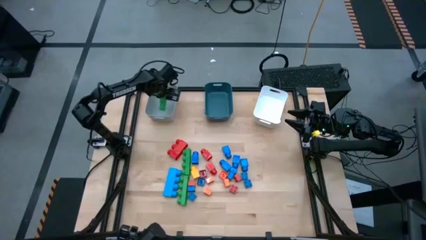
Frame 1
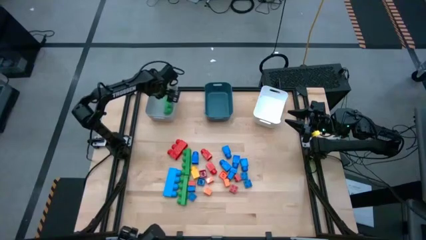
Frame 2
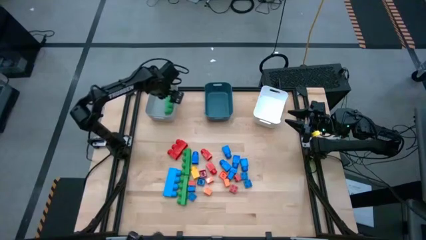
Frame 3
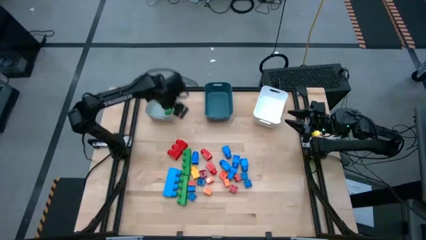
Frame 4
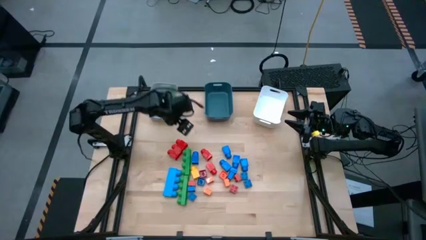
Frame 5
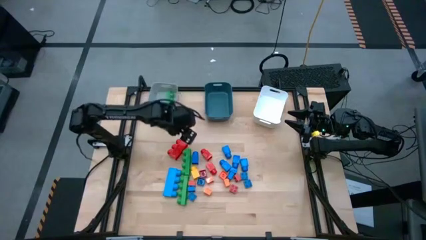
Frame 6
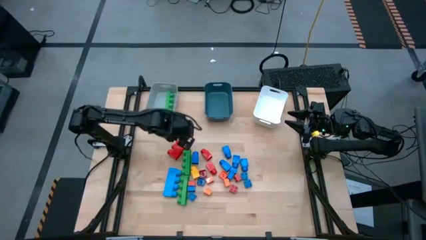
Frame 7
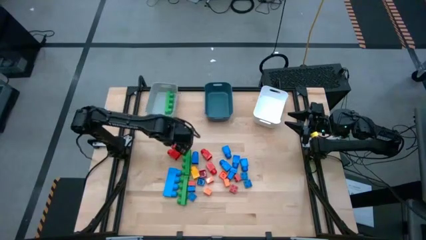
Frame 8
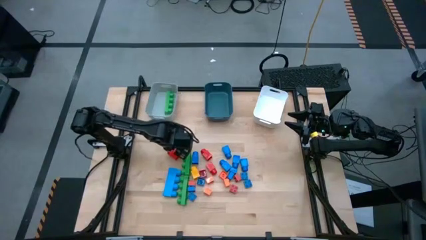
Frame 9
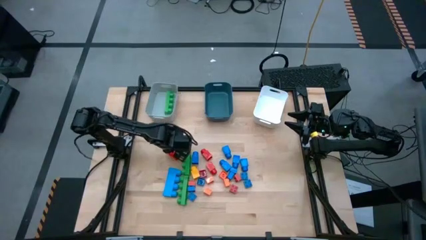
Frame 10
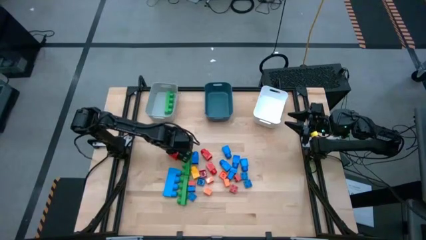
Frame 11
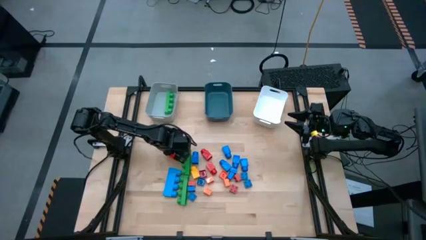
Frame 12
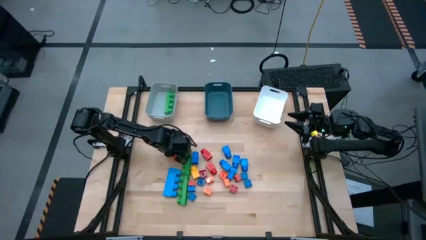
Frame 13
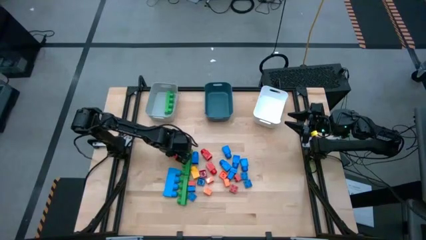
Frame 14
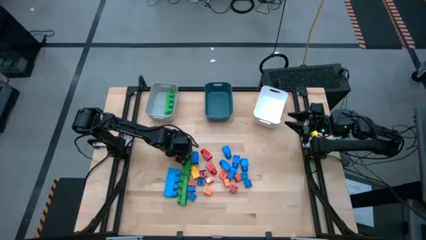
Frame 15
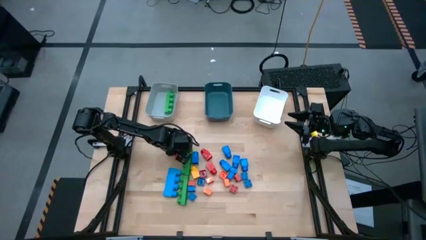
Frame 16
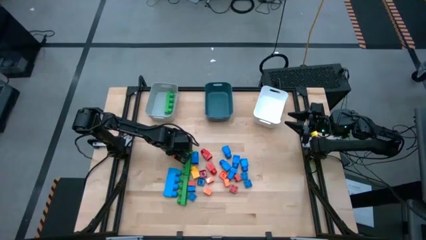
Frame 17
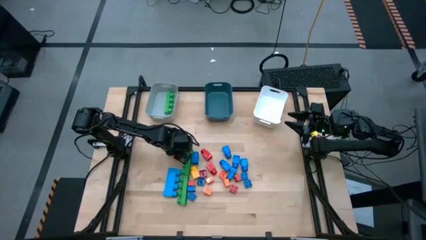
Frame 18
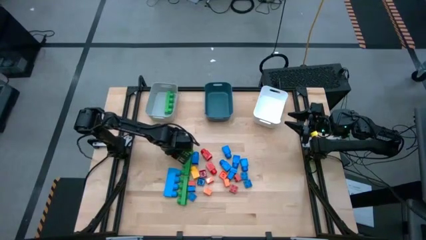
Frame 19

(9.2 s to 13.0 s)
Task: Sort blocks by size
Put the large red 3 stud game piece into the gray bin

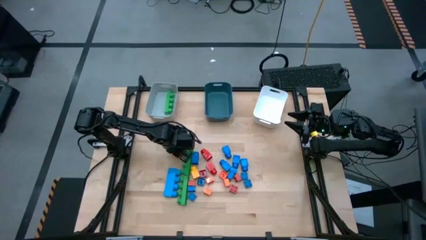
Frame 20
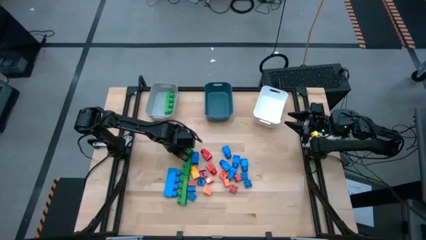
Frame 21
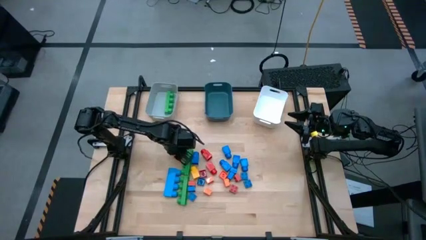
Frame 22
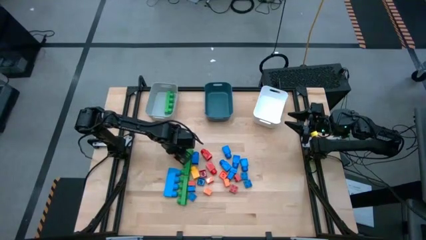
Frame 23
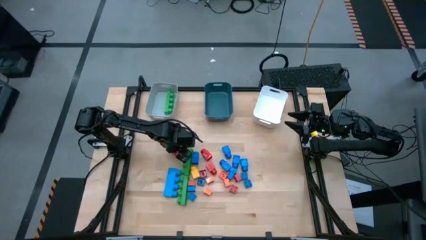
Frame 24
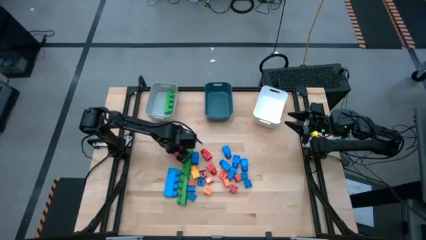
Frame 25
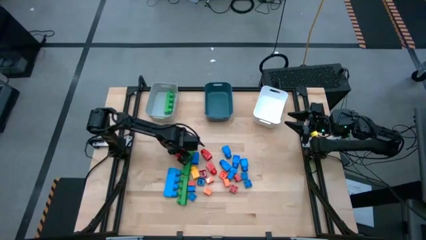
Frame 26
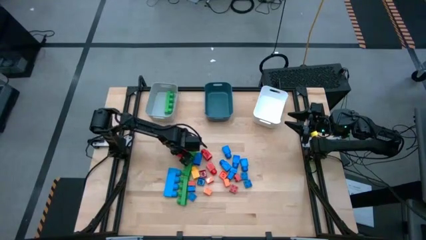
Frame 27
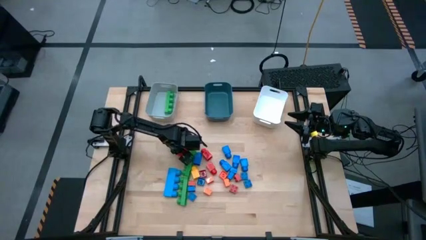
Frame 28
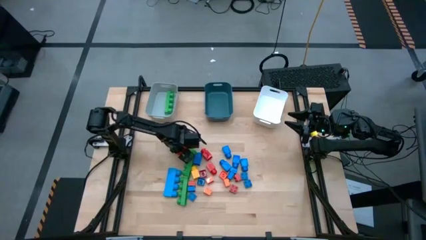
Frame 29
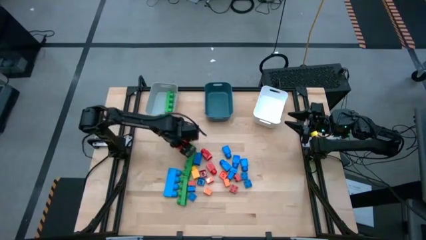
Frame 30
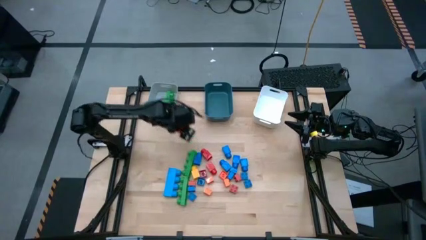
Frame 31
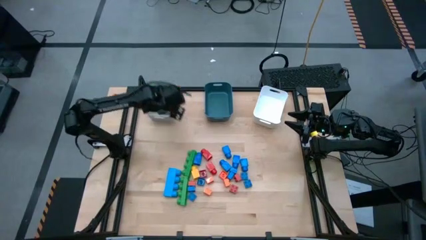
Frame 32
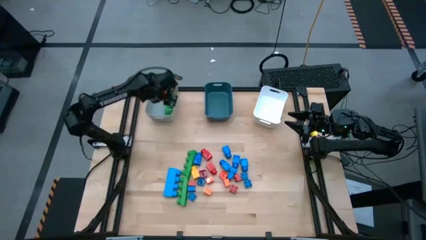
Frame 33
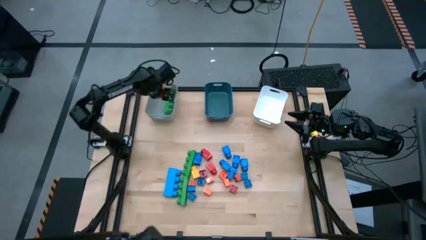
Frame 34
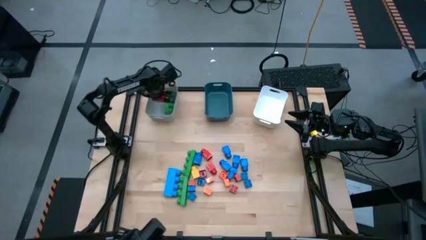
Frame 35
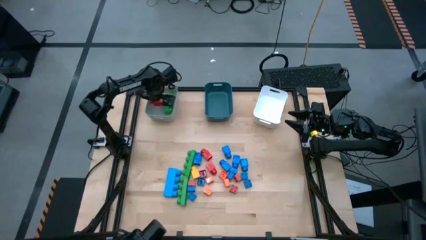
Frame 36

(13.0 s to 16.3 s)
Put the large red 3 stud game piece into the gray bin

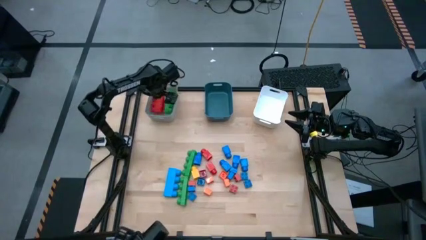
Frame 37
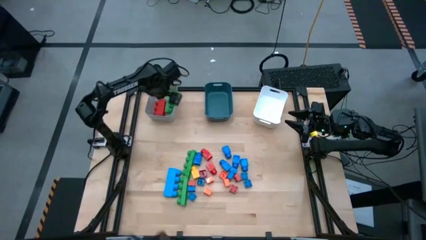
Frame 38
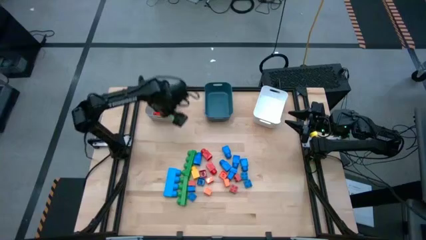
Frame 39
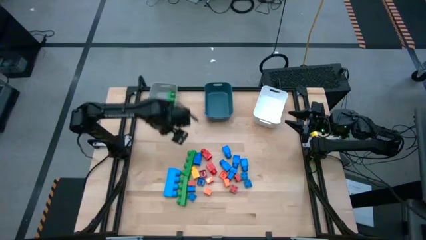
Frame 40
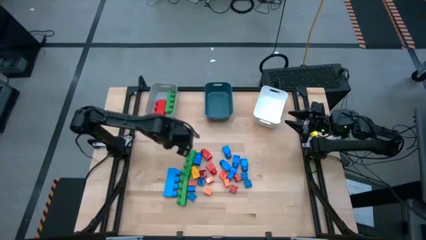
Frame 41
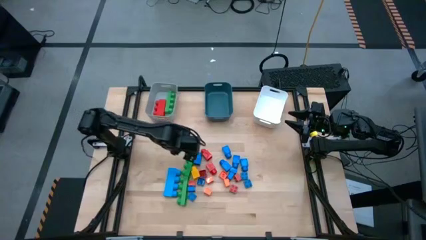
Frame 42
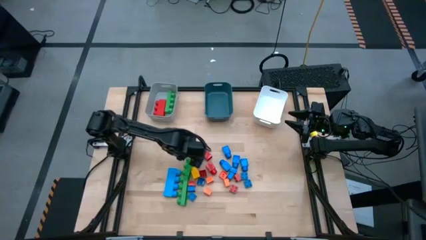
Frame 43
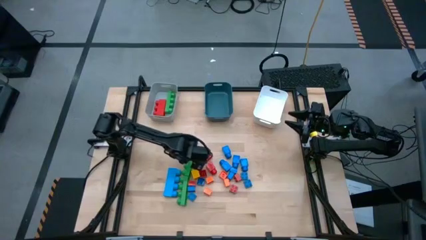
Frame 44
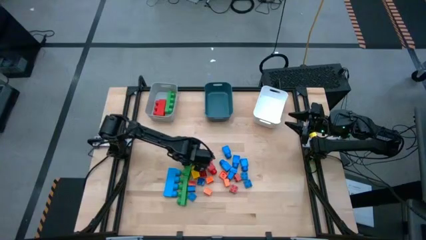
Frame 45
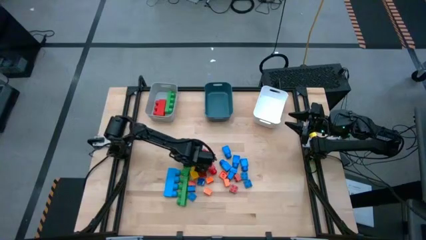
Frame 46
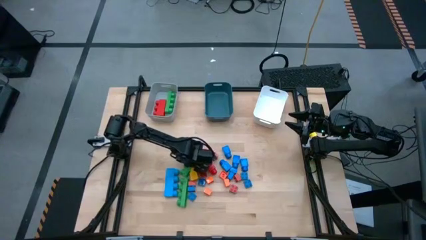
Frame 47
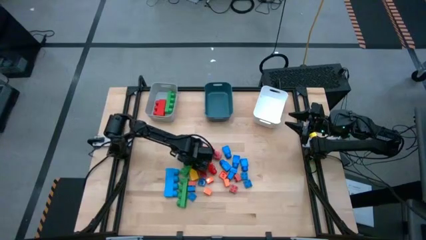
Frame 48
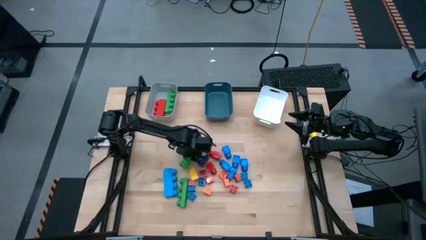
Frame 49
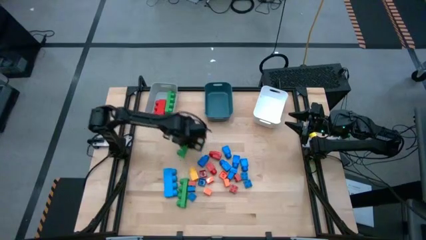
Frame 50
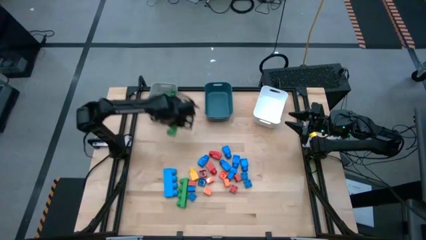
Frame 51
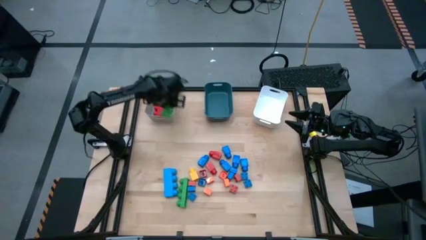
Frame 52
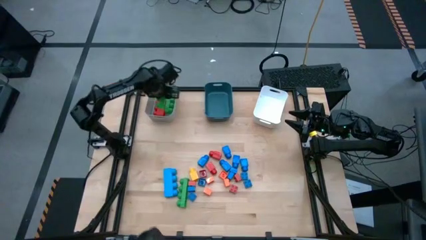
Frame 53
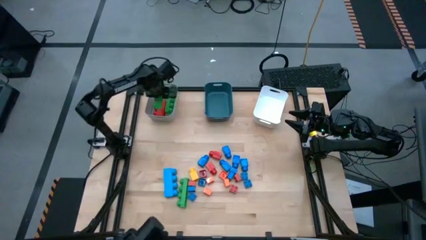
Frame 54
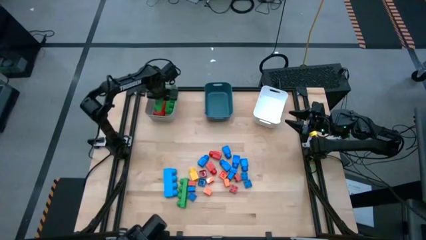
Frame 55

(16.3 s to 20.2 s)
Put the large green 4 stud game piece into the gray bin

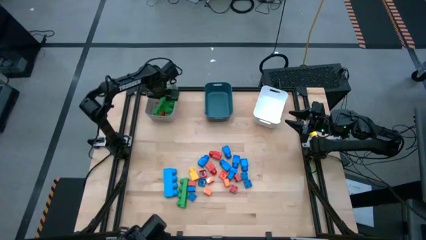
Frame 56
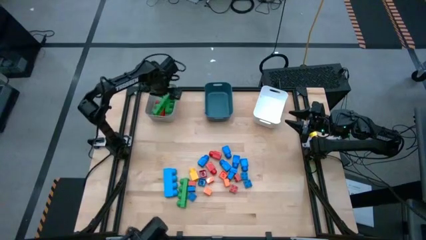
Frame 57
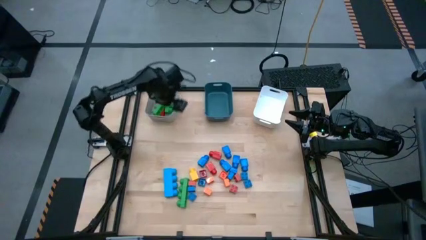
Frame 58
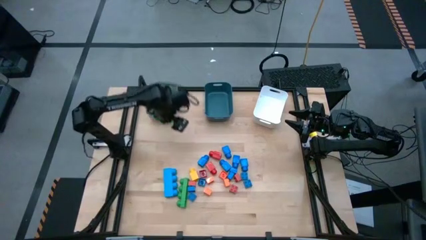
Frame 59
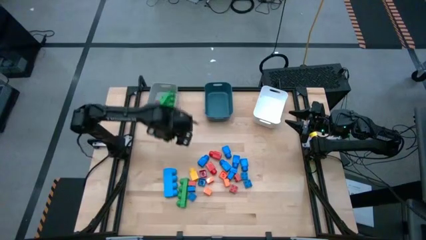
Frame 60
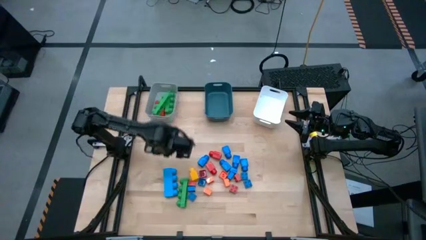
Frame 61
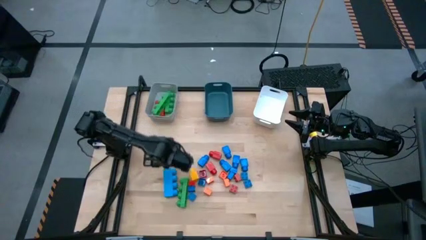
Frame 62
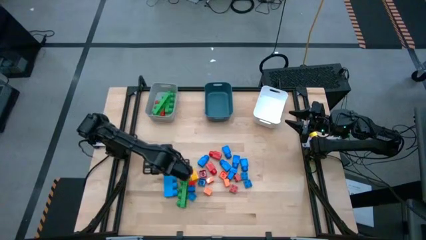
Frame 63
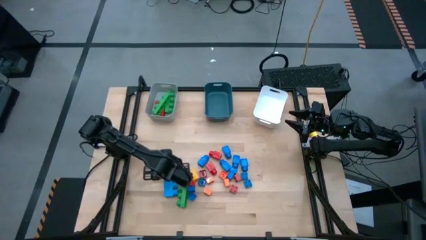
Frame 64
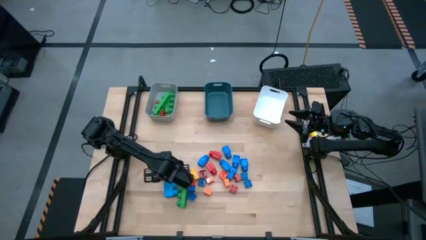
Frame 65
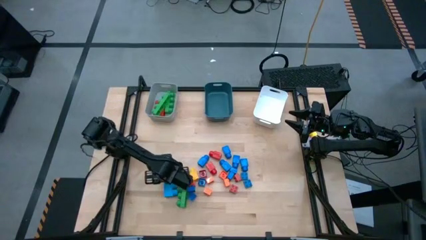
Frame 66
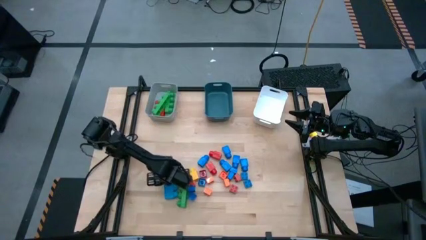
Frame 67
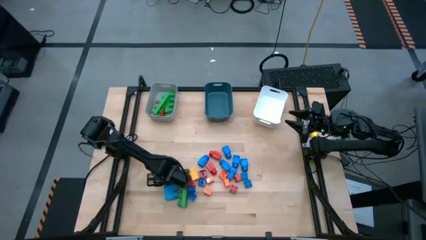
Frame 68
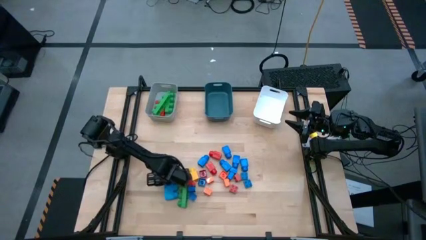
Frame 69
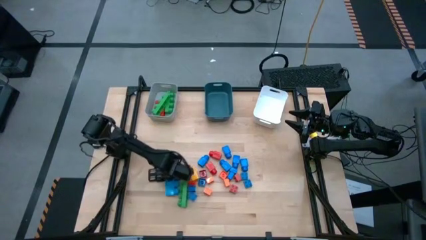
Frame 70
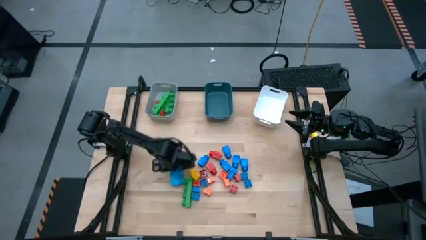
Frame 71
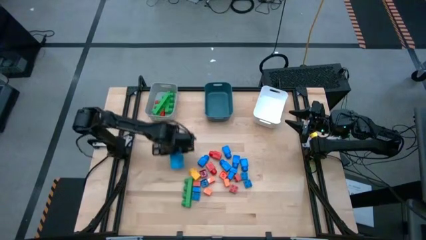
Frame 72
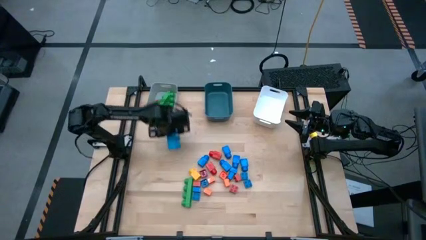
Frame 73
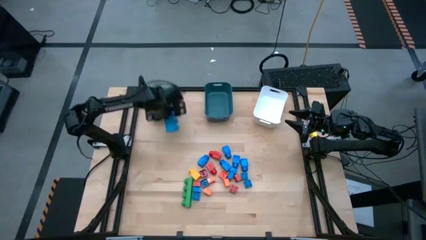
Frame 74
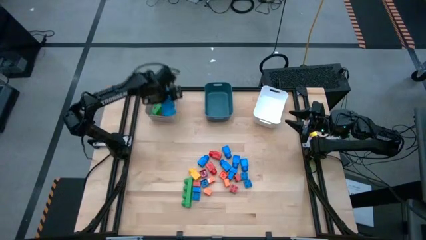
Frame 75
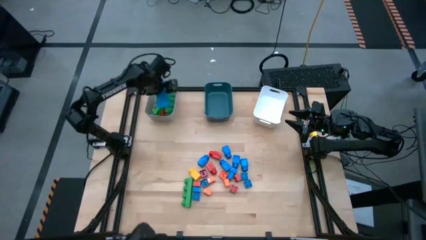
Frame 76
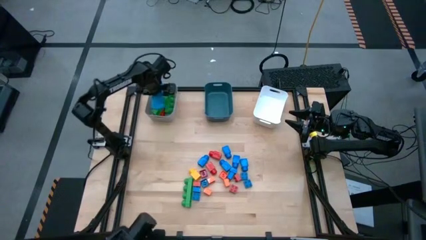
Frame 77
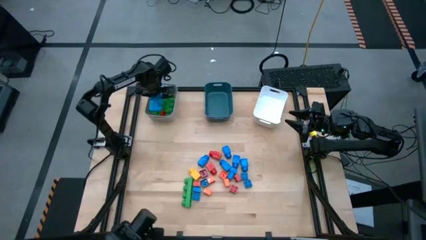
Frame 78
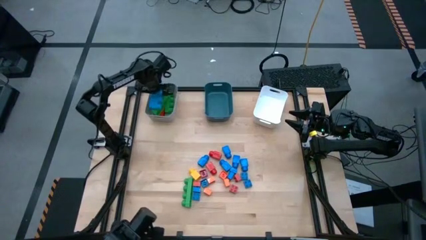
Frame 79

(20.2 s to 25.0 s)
Put the large blue 4 stud game piece into the gray bin
